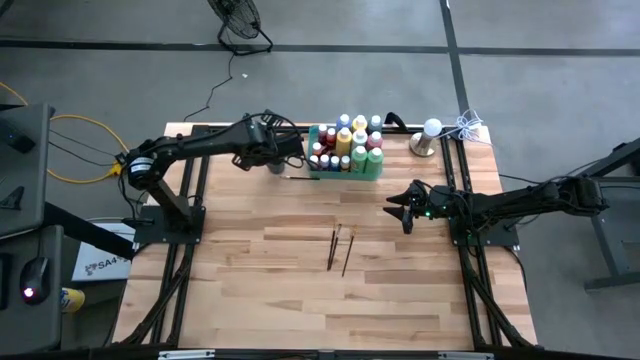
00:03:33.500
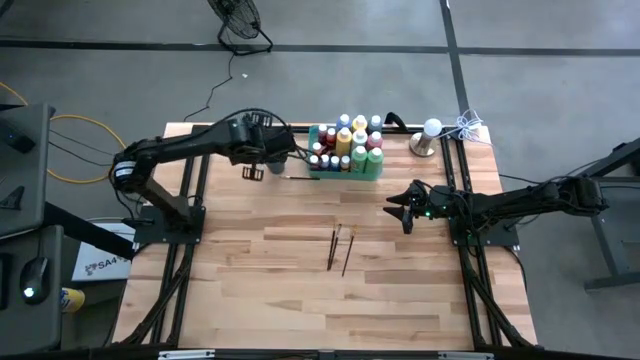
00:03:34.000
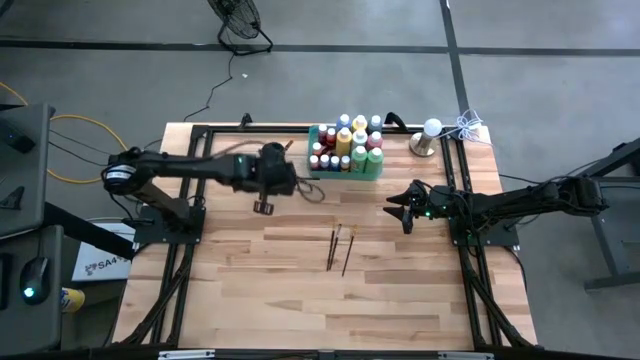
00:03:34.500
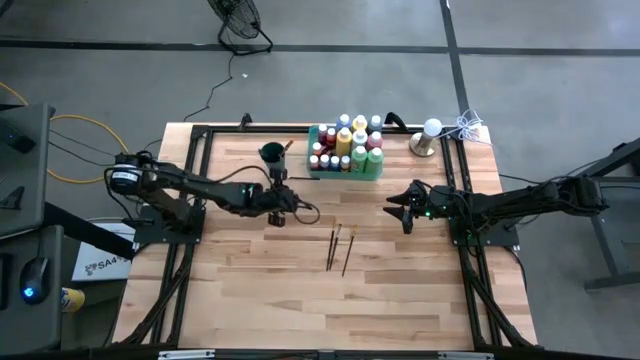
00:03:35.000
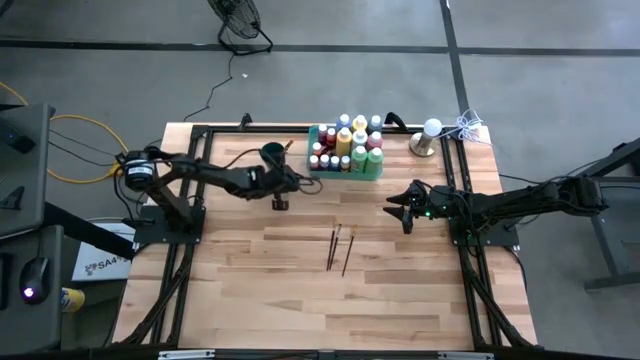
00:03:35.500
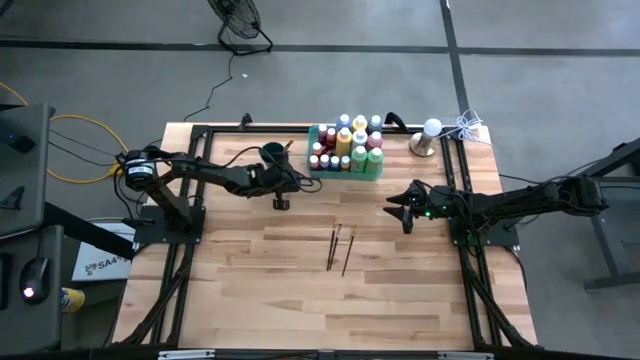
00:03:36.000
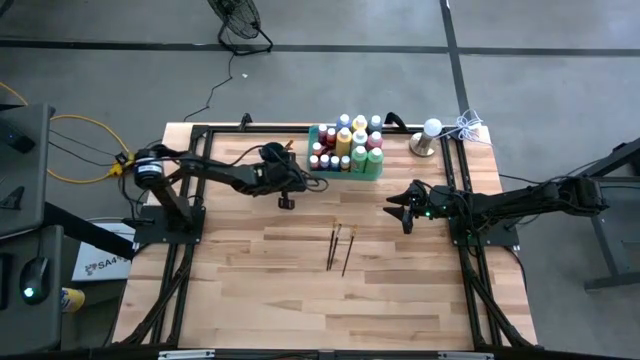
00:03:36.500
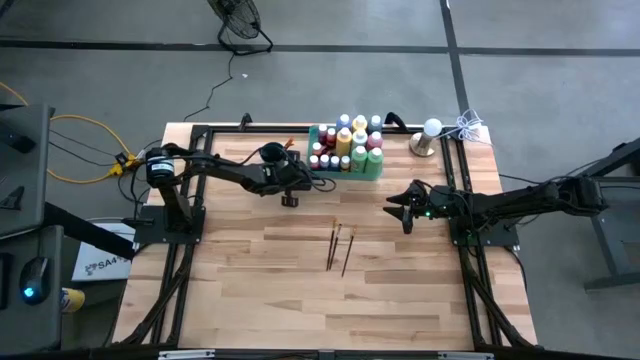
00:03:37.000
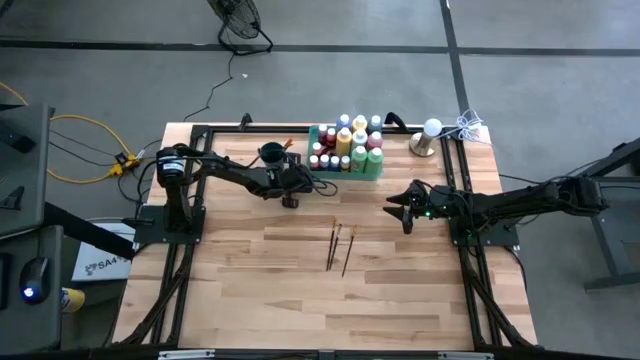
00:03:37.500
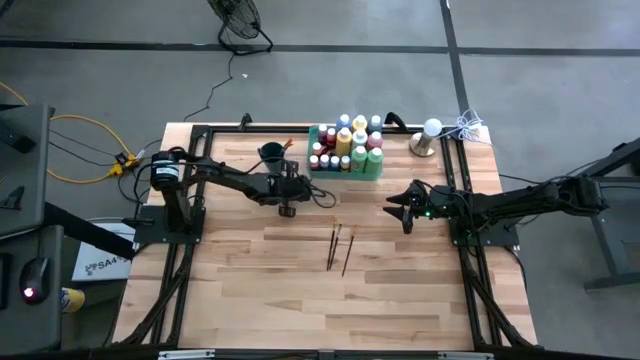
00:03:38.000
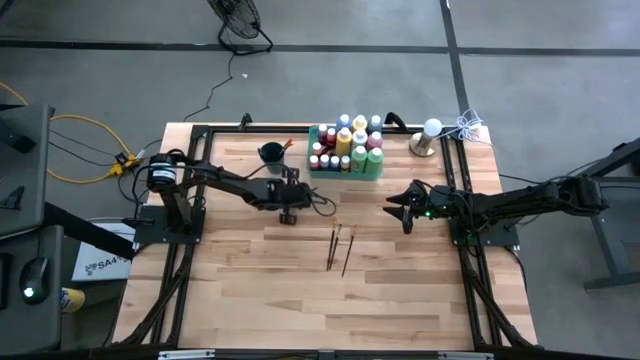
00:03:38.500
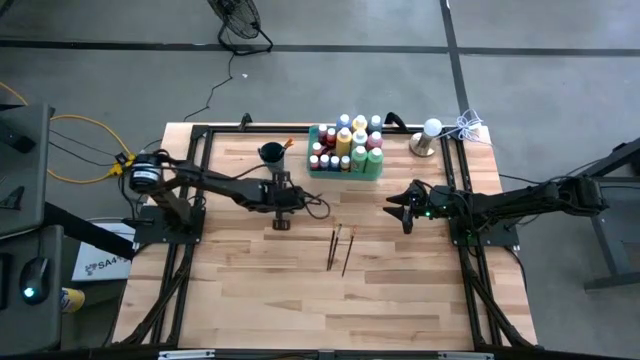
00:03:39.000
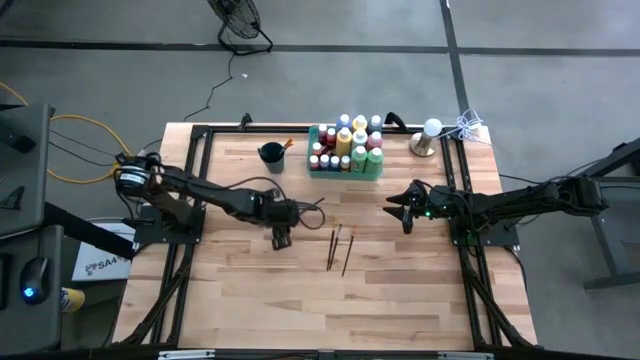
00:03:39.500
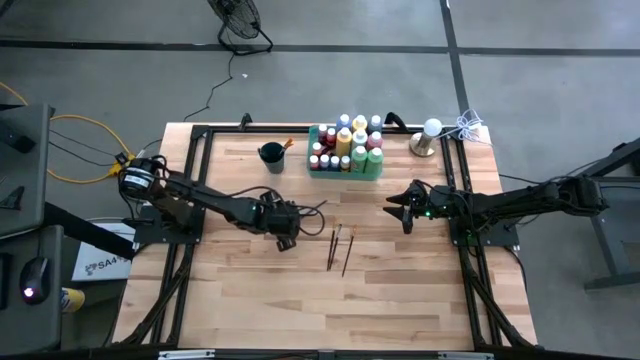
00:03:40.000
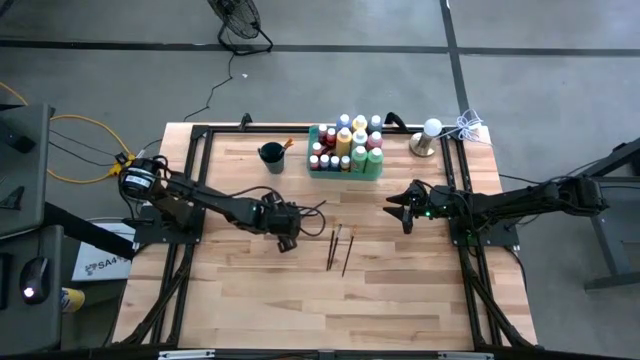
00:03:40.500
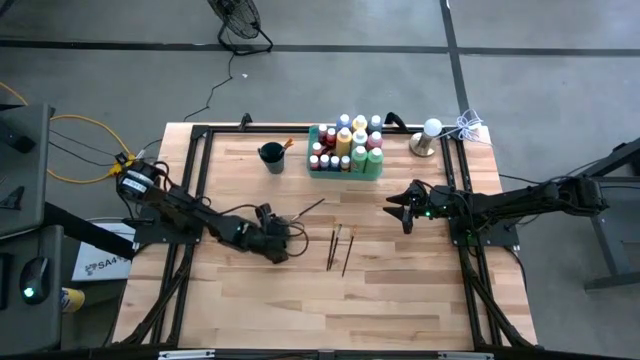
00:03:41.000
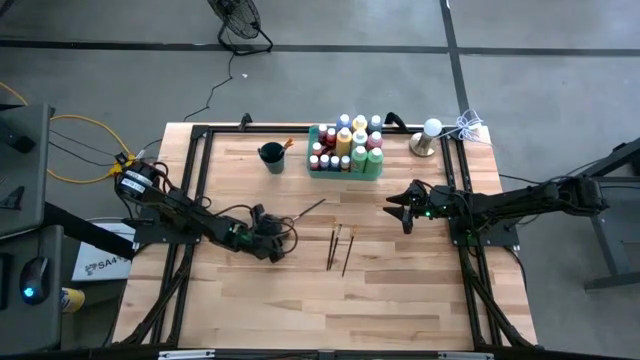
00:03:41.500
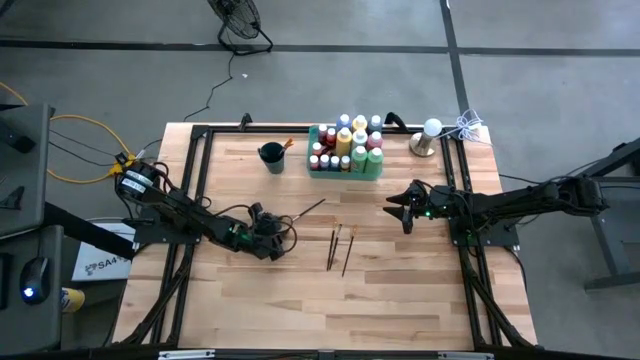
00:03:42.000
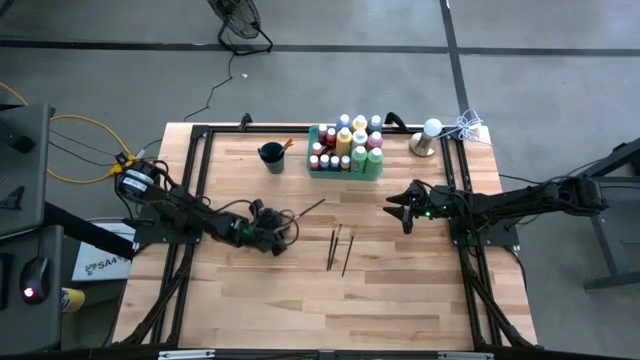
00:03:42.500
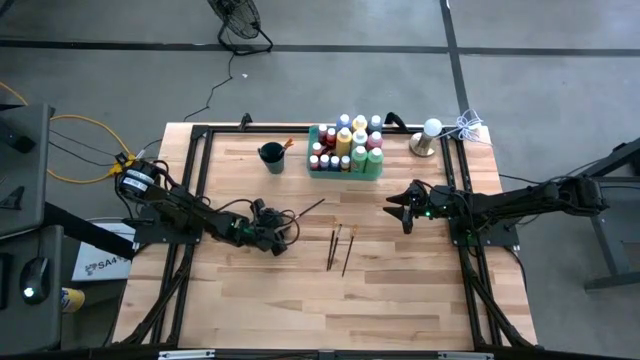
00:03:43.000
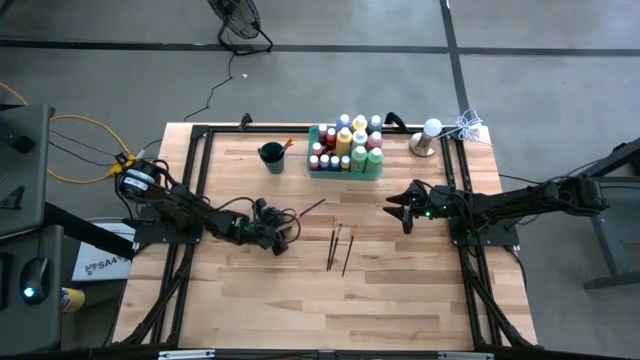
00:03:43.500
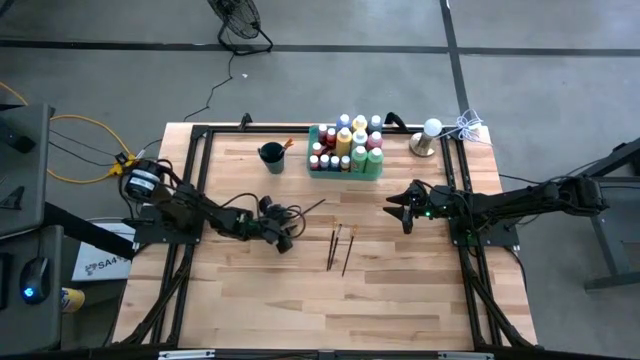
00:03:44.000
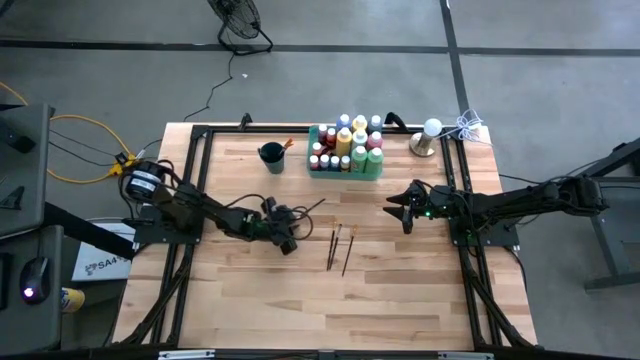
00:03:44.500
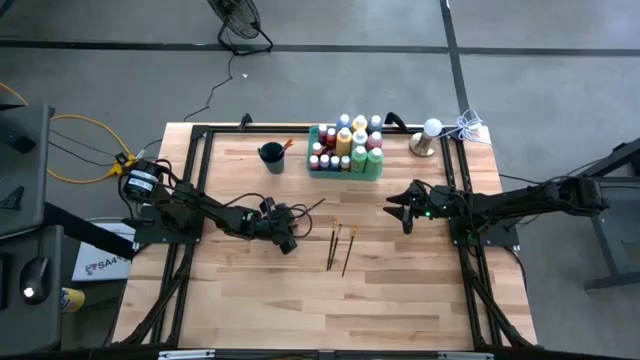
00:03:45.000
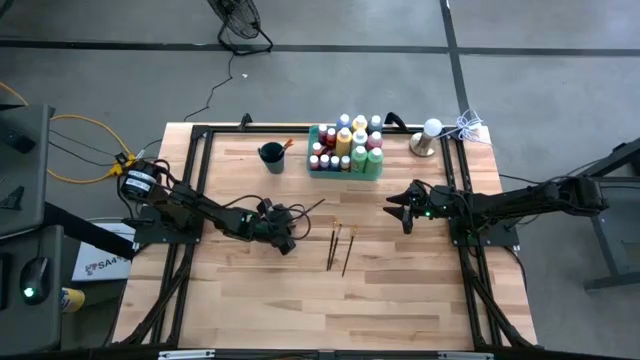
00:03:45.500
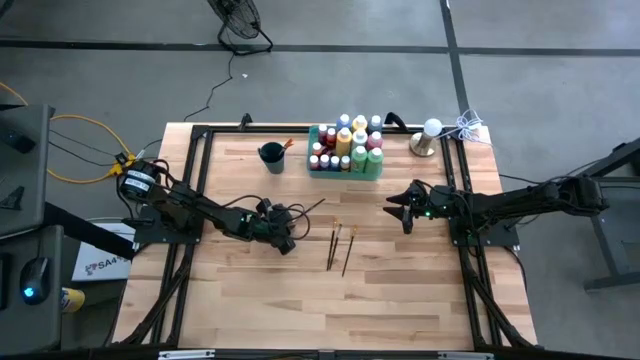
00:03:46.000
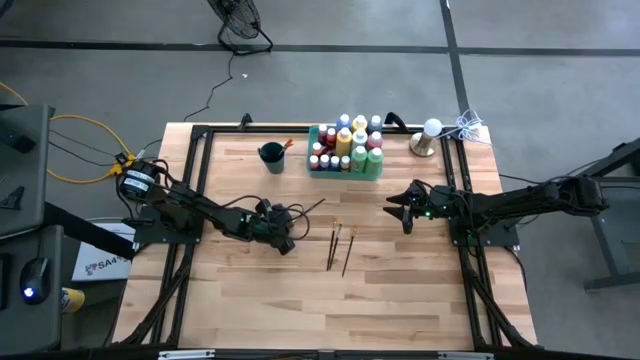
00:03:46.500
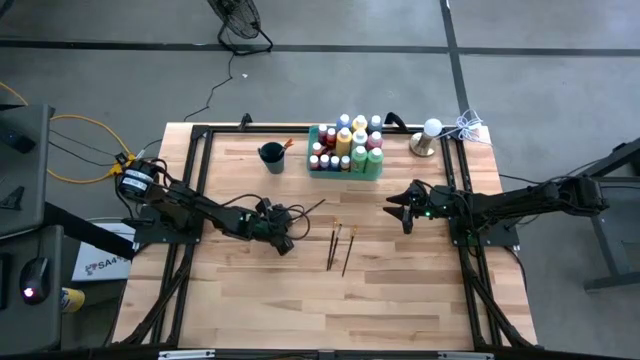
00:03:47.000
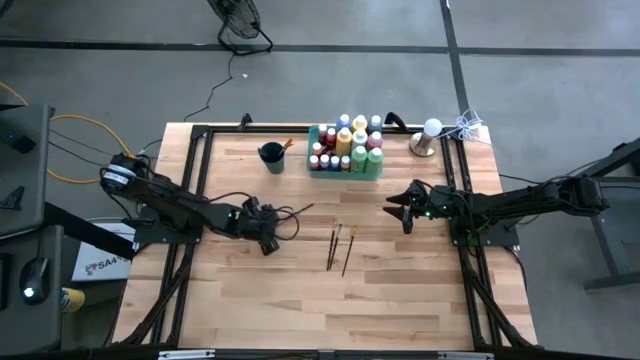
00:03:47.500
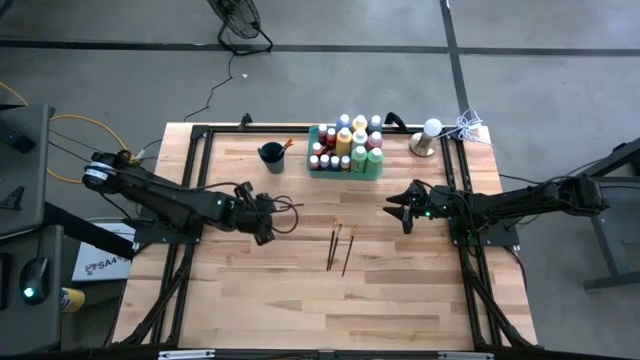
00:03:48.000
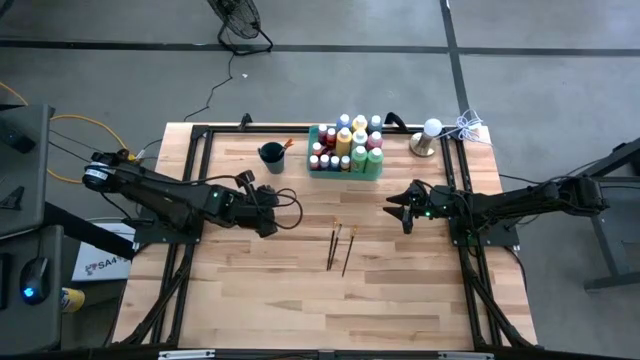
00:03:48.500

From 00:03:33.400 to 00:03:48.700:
Task: Pick & Place Paint Supplies
Put the silver black paint brush into the blue cup

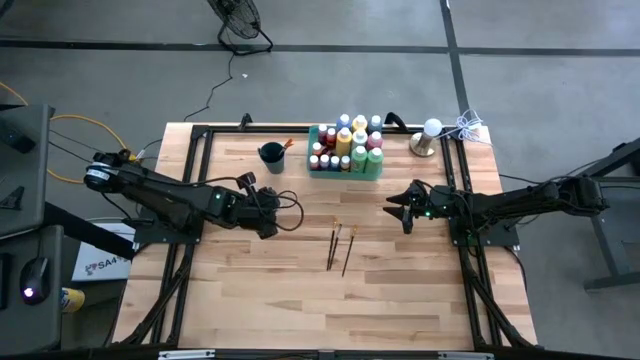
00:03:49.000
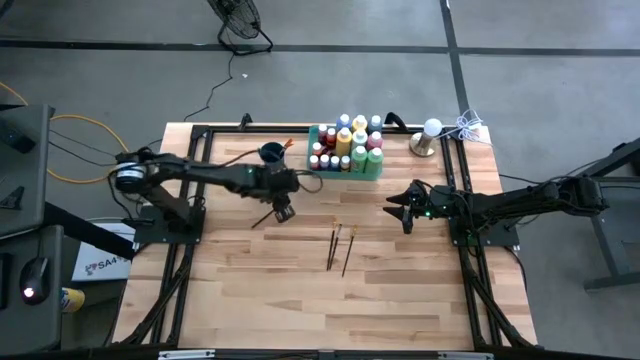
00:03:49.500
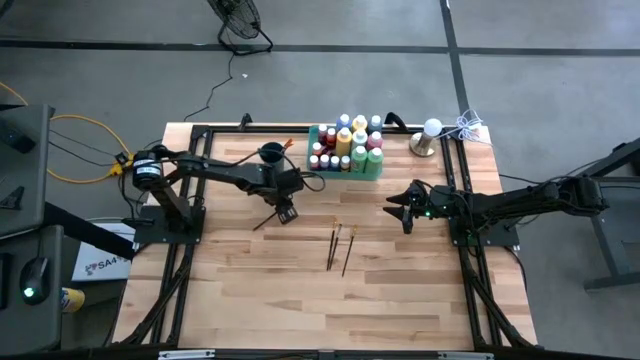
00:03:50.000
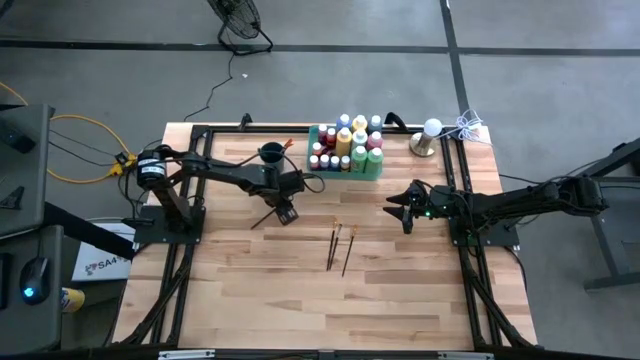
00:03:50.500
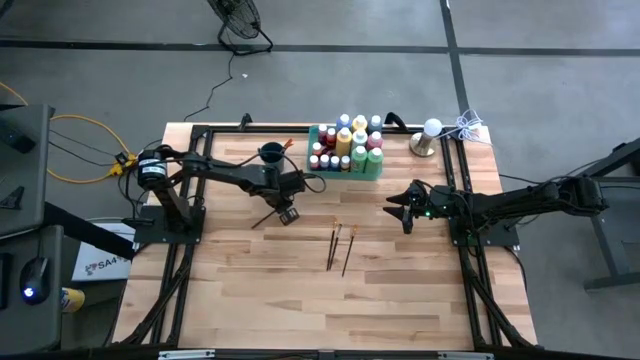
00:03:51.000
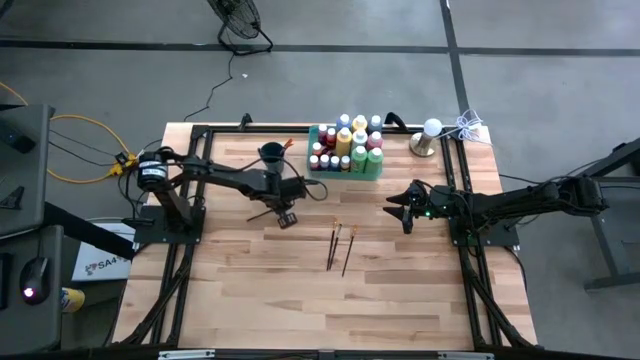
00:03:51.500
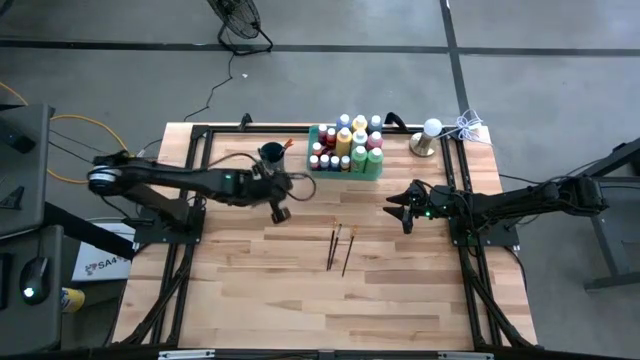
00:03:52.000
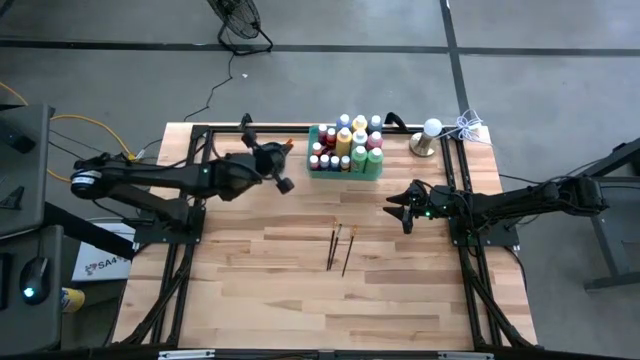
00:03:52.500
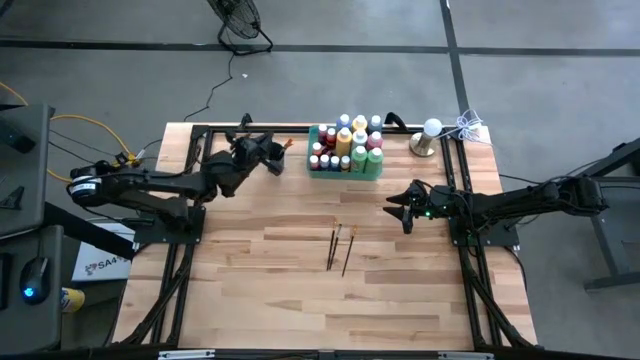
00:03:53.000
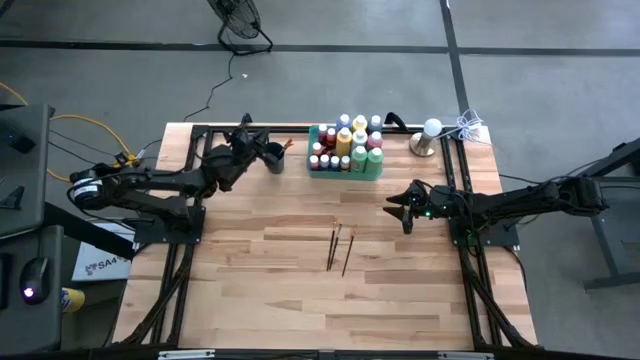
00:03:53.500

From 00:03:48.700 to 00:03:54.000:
Put the silver black paint brush into the blue cup

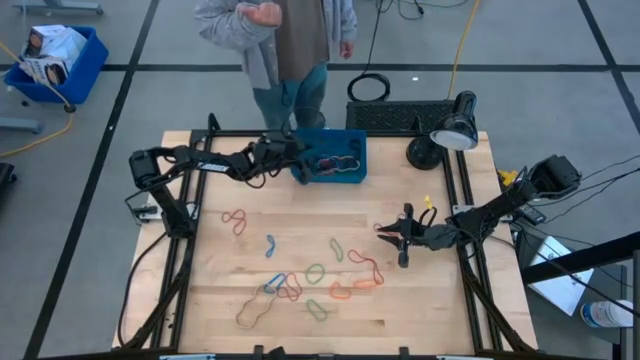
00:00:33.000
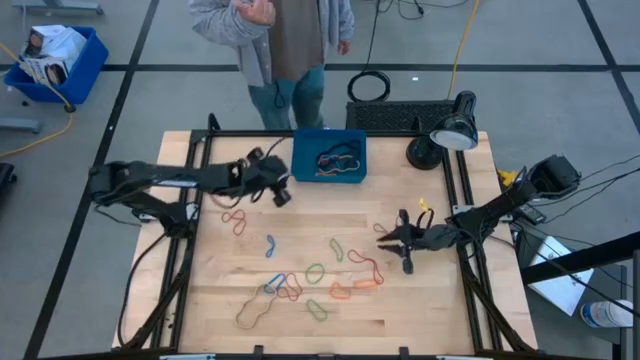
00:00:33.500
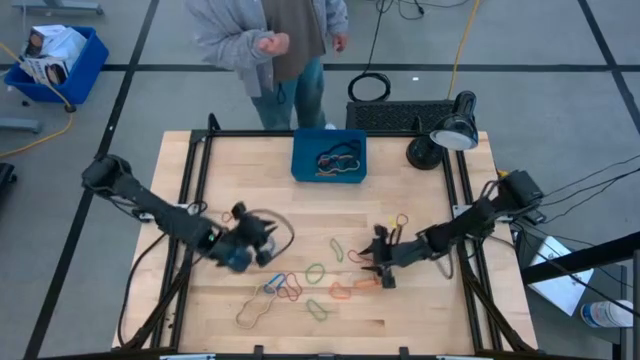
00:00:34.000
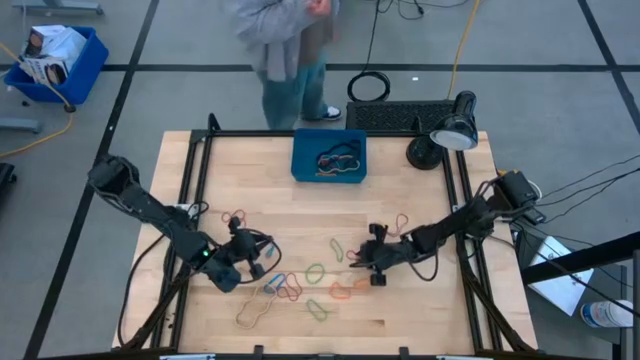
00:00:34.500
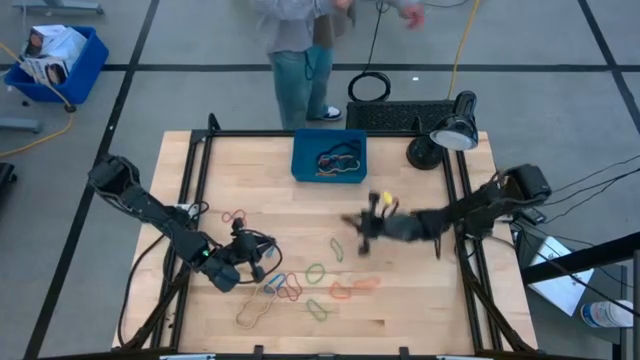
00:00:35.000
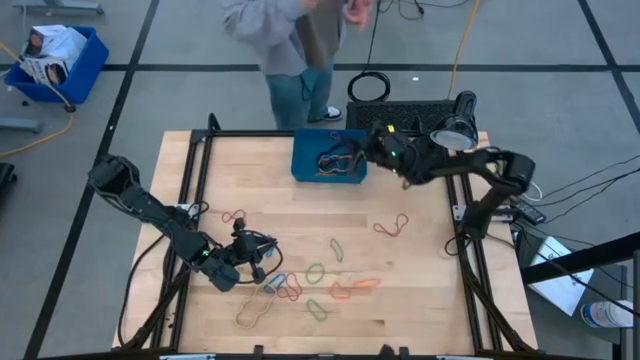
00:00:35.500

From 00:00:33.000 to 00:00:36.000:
Task: Pick and place rubber bands into bin
Put the red rubber band into the blue bin
